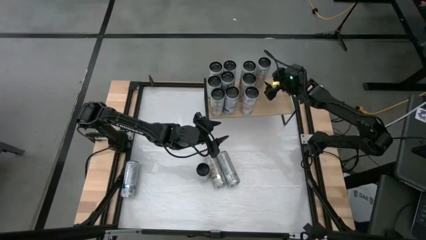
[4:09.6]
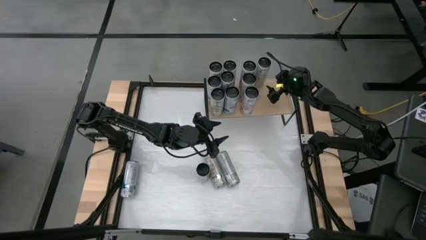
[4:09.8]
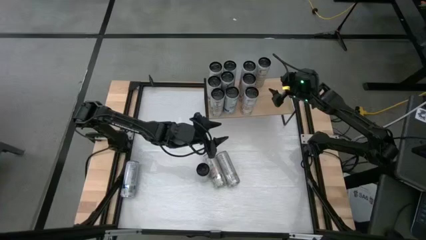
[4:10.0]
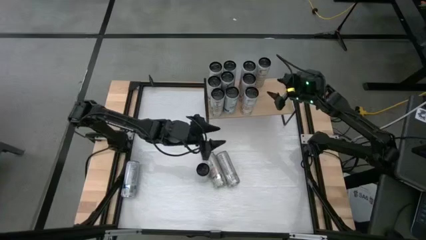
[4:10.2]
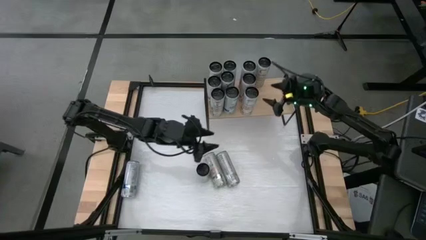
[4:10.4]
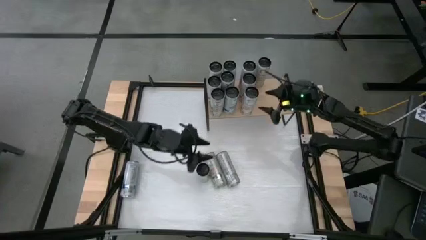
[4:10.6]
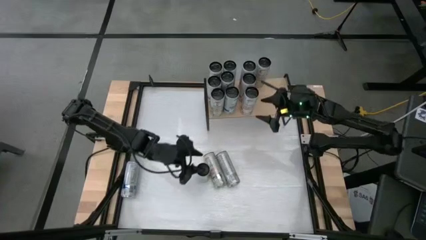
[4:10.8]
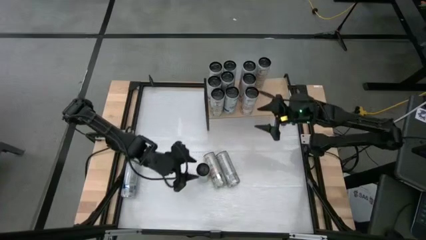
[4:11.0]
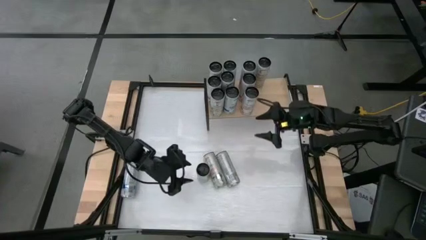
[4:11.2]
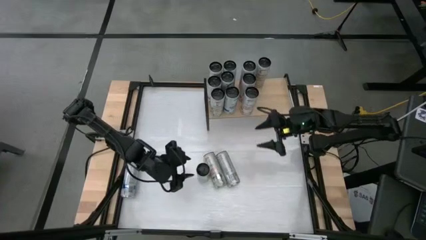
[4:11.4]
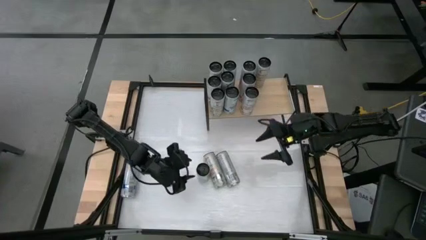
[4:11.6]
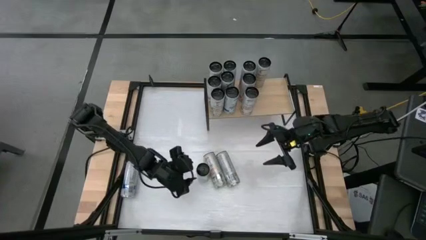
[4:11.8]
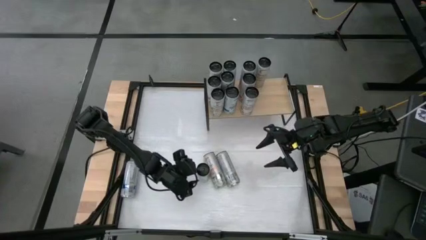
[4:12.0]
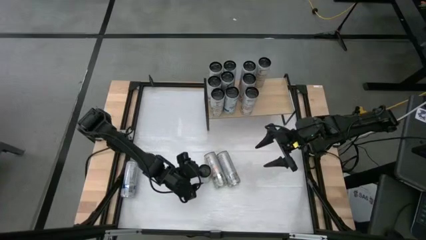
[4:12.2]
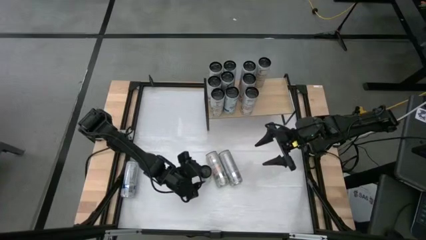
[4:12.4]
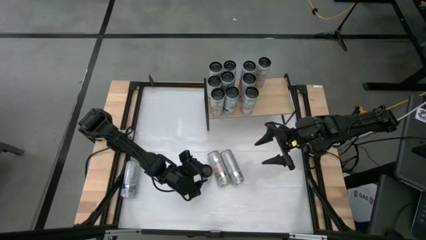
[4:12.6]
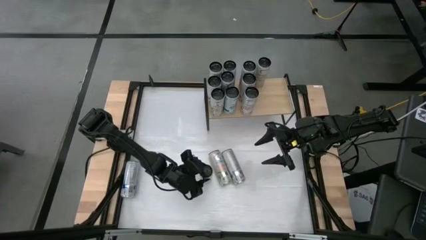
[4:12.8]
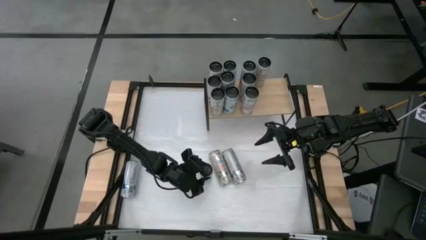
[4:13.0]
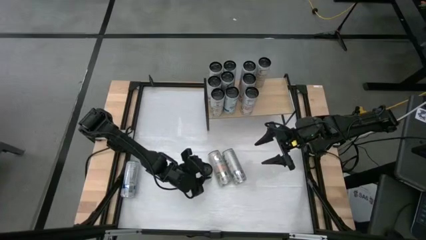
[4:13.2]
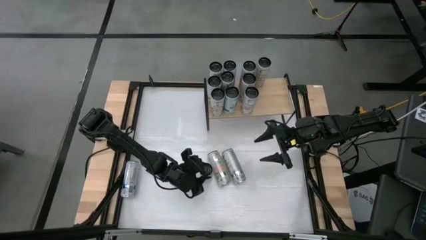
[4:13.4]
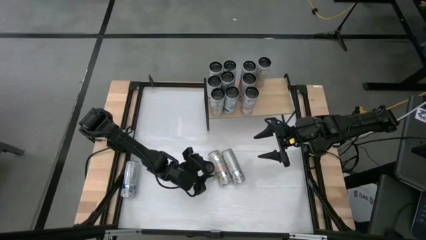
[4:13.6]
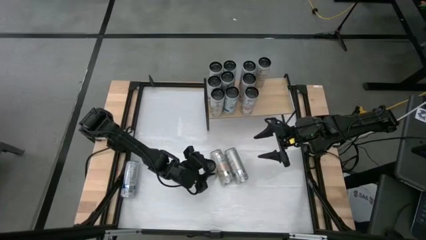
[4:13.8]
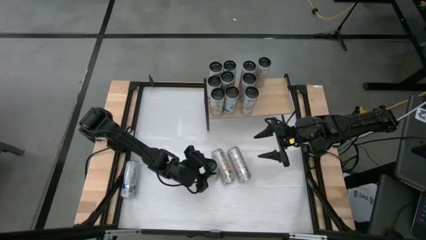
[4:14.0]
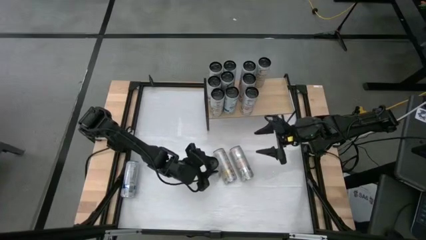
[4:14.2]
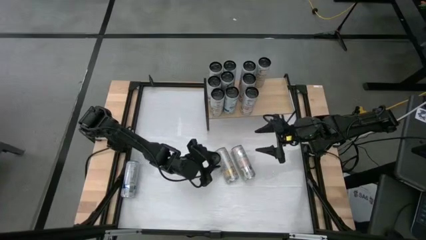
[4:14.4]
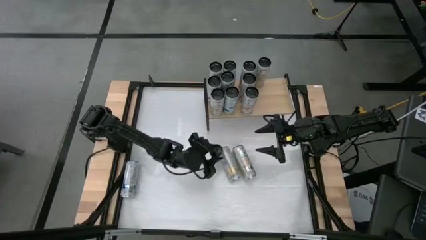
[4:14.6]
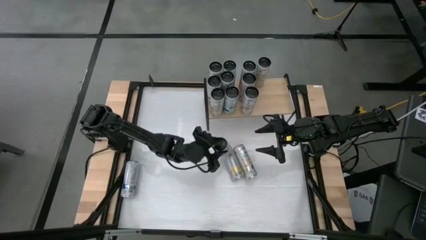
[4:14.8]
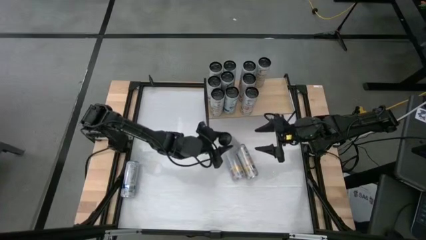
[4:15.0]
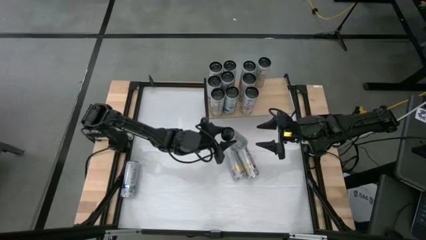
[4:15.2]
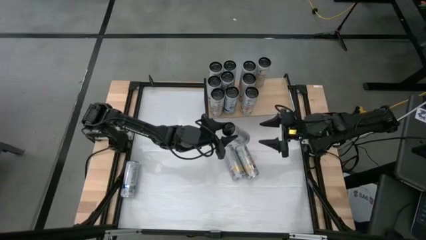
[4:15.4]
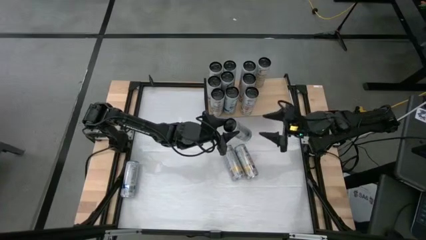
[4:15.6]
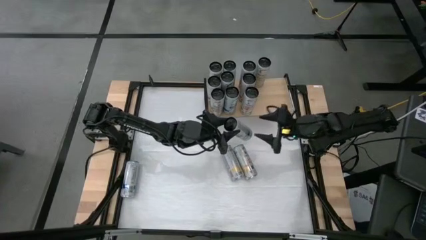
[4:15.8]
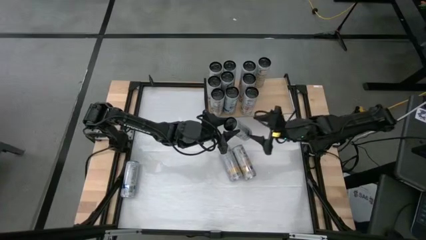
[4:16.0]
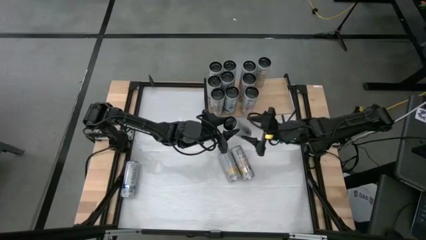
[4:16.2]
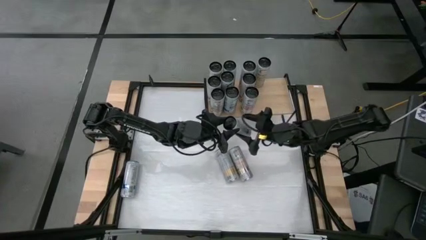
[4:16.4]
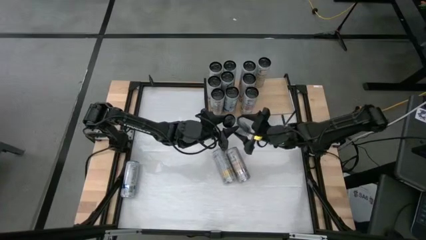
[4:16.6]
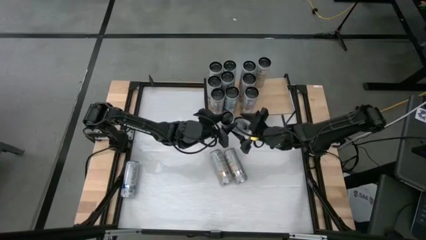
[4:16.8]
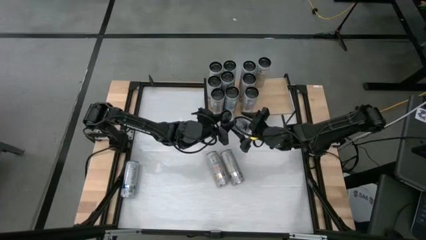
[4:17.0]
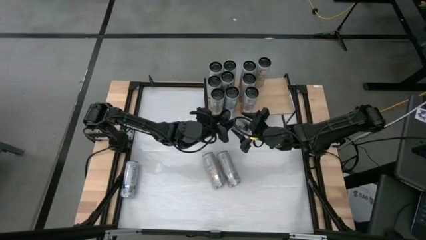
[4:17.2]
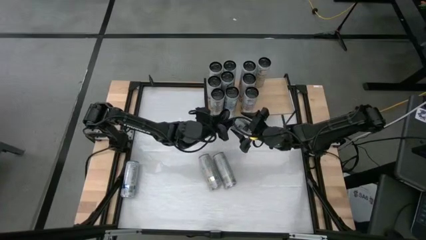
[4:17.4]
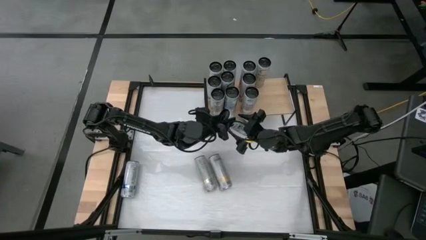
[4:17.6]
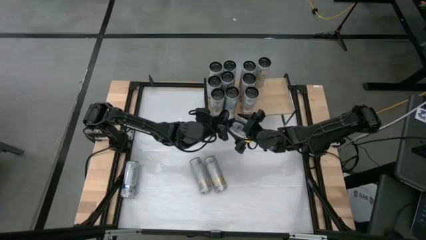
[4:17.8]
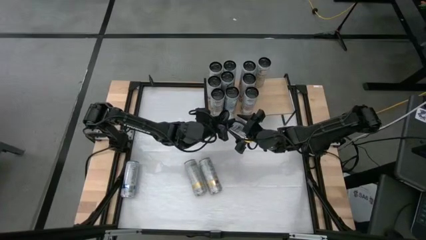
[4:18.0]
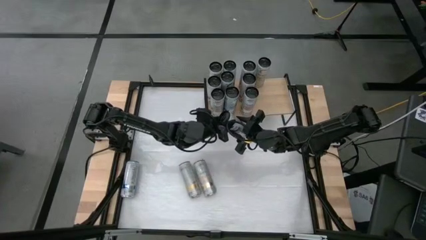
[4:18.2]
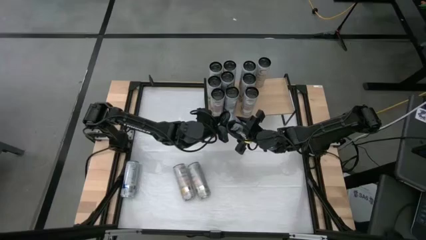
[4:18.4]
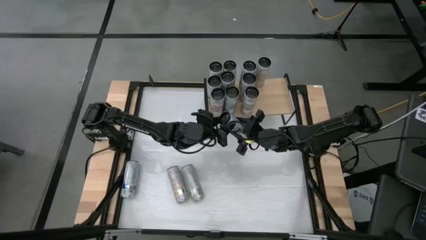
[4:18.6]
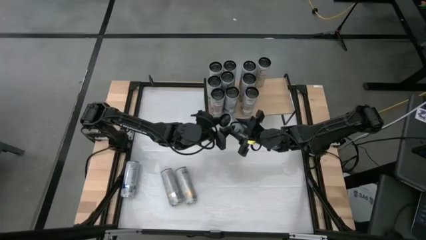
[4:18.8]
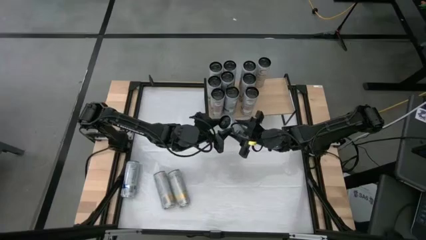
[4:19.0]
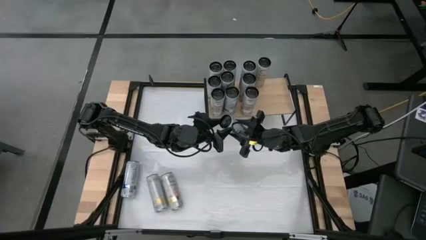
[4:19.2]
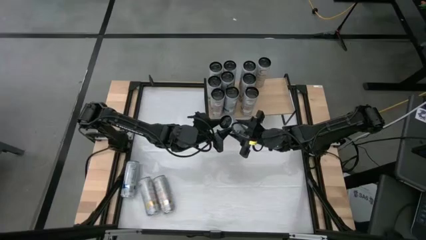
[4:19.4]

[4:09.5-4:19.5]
Task: Place canned beverage on shelf
Put the blue soda can on the shelf

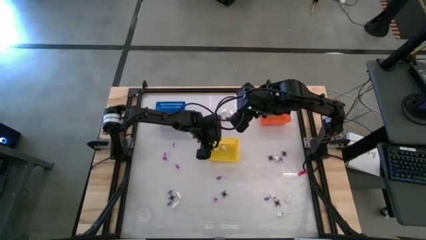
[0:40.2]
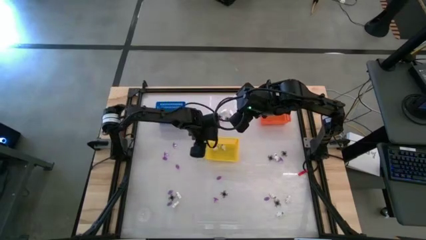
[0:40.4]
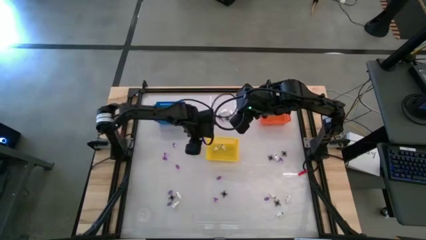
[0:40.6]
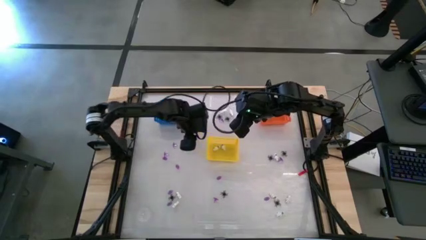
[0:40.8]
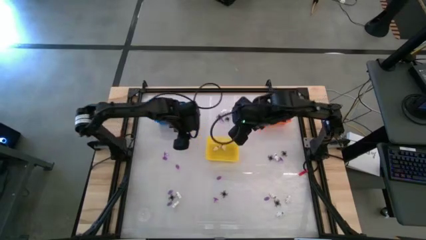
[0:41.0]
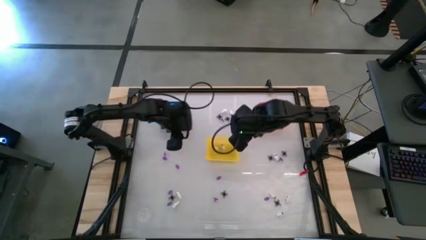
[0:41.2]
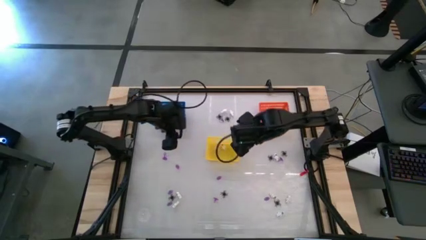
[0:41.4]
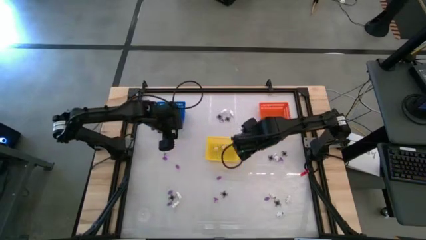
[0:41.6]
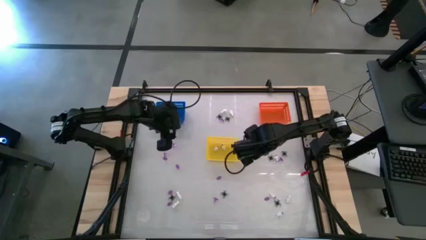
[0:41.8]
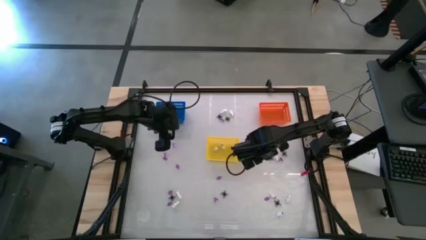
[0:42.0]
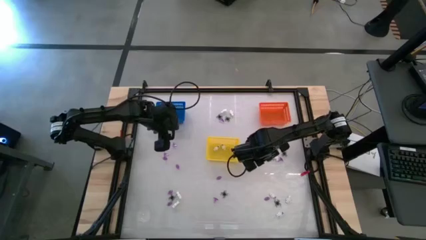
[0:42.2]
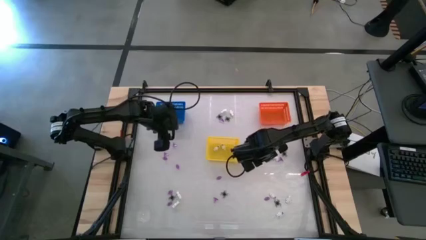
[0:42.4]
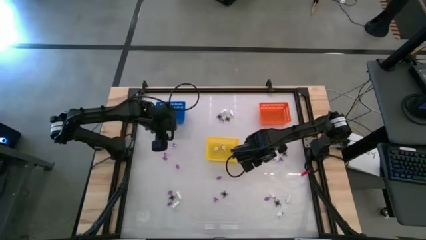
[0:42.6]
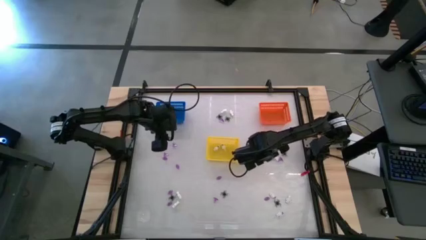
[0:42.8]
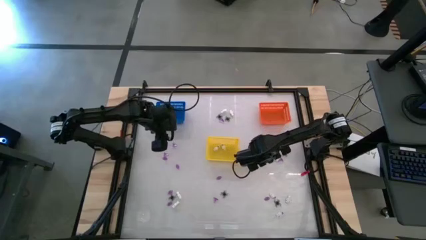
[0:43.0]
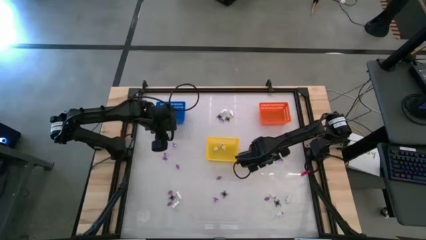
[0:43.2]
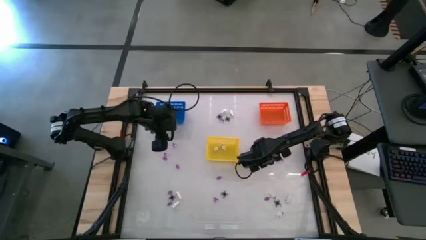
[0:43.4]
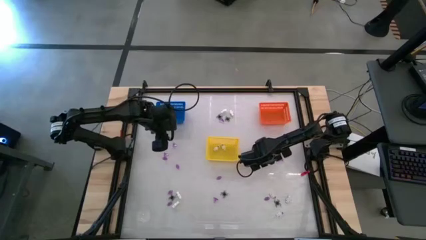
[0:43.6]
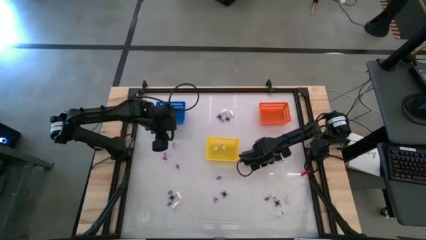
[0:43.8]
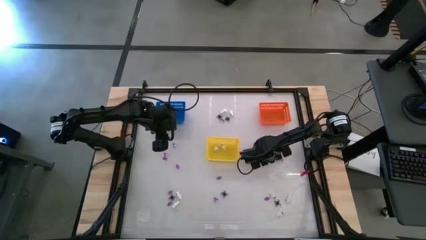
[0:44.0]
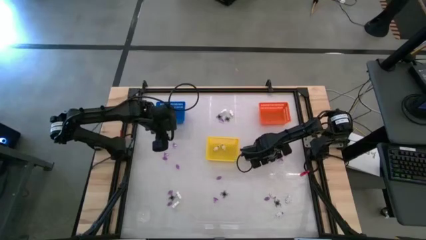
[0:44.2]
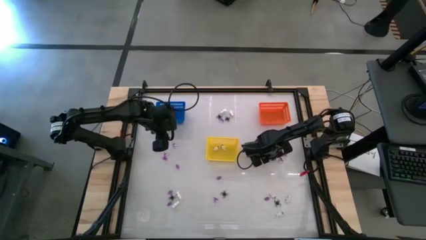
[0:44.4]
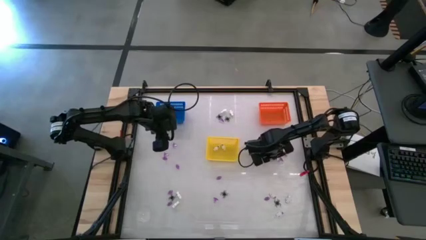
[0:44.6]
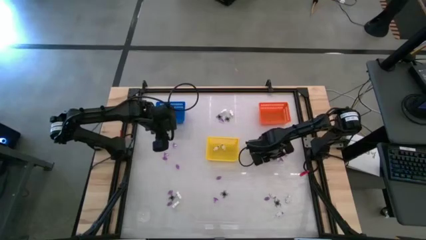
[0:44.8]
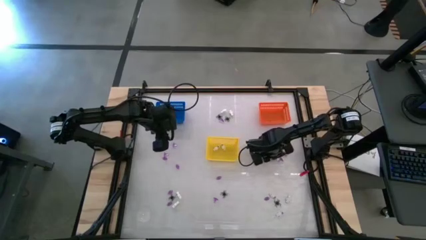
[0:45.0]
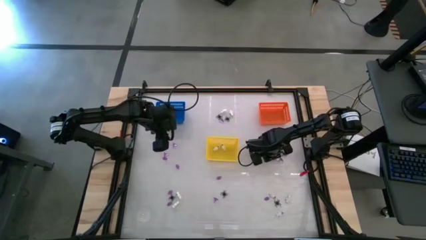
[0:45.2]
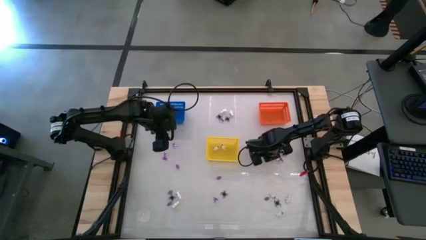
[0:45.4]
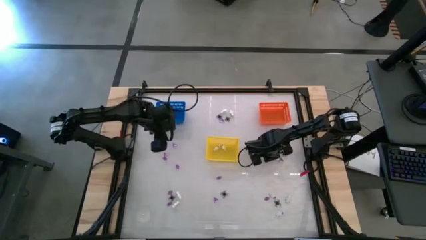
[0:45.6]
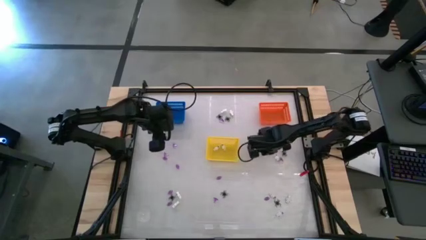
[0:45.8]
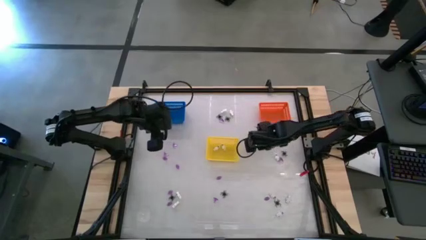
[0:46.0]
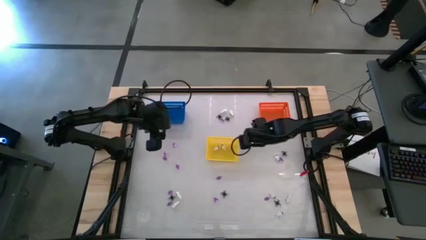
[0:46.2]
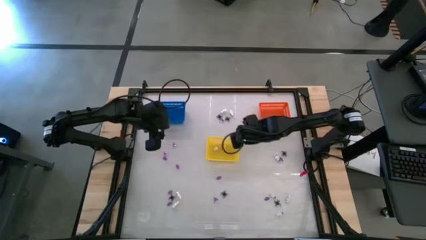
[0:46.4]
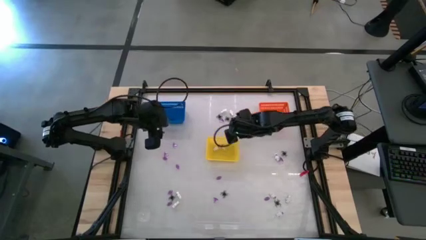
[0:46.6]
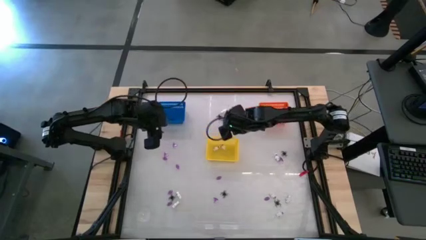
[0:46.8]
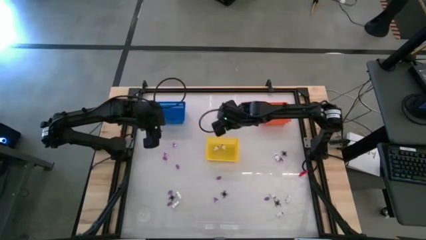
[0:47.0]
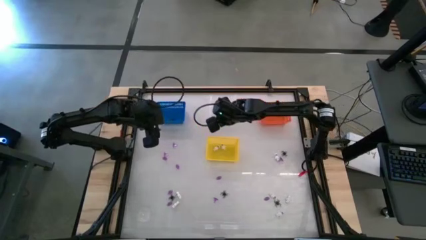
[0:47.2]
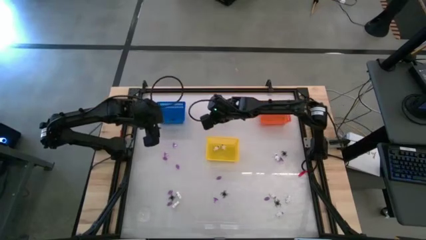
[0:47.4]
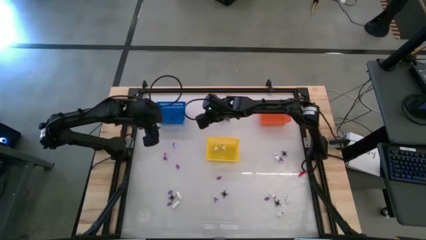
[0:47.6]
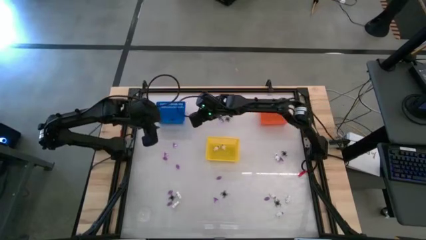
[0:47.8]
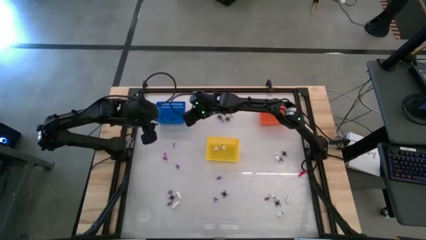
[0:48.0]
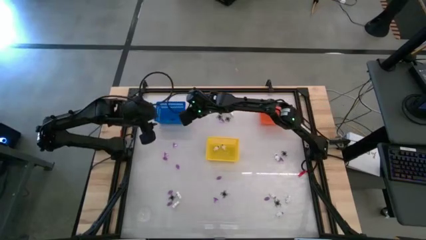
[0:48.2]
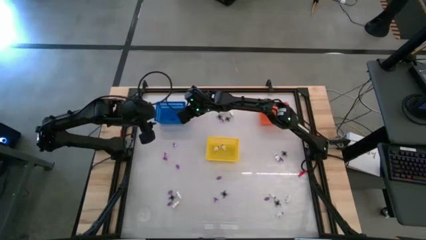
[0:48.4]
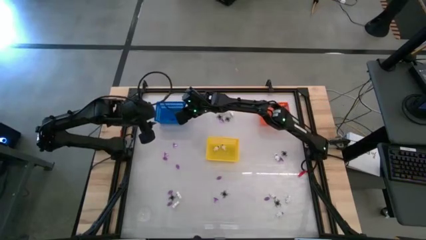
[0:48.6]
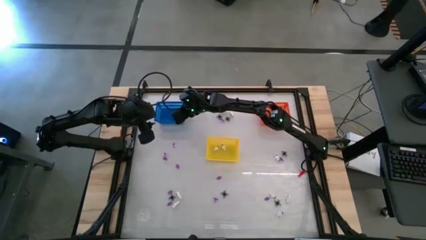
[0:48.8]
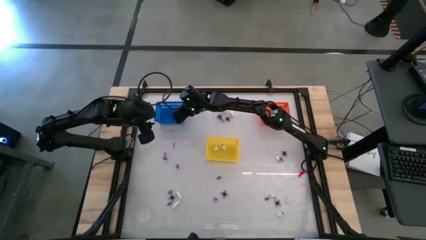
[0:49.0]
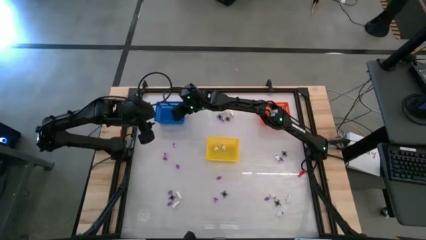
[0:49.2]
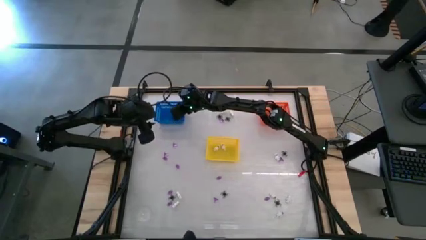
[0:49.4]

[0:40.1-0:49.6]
Task: Sort Halloween decoration
Put the black spider toy into the blue bin
